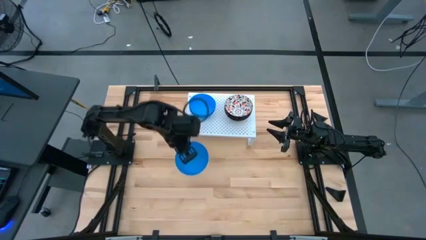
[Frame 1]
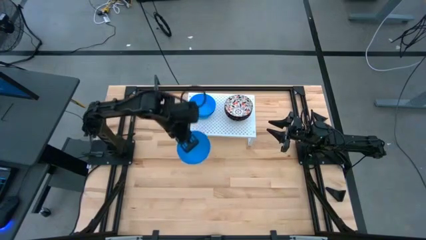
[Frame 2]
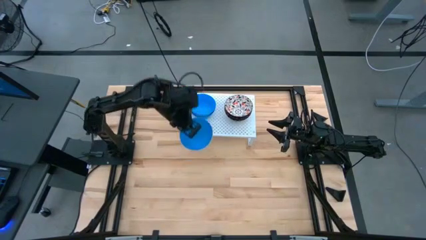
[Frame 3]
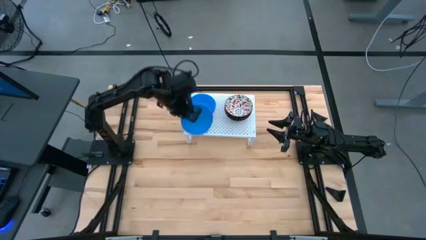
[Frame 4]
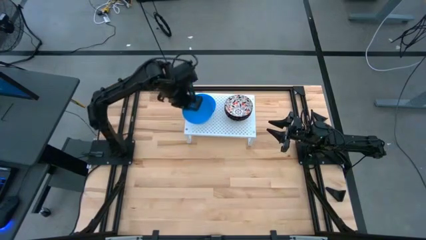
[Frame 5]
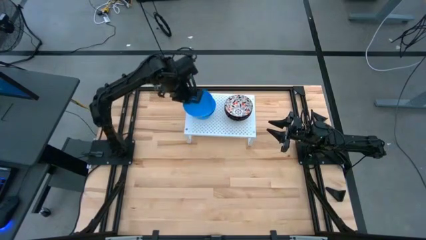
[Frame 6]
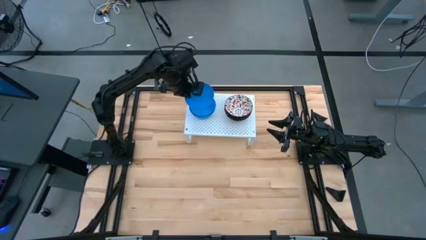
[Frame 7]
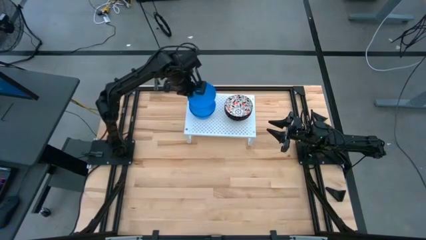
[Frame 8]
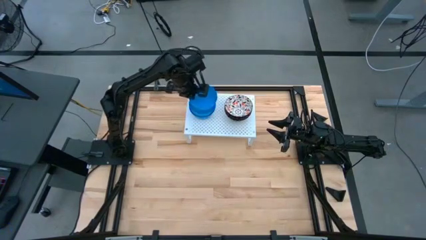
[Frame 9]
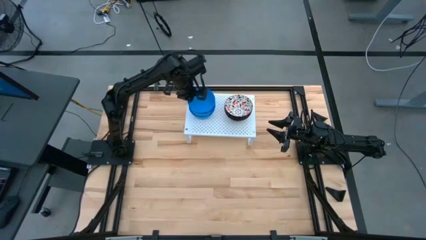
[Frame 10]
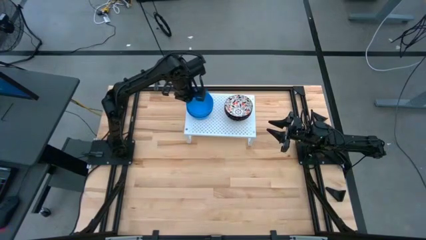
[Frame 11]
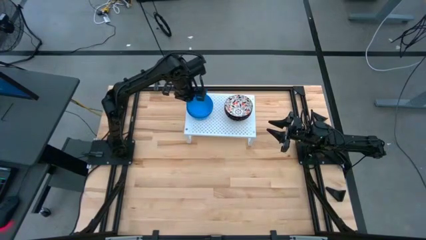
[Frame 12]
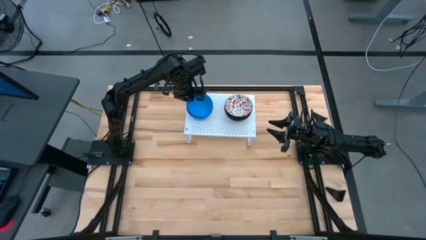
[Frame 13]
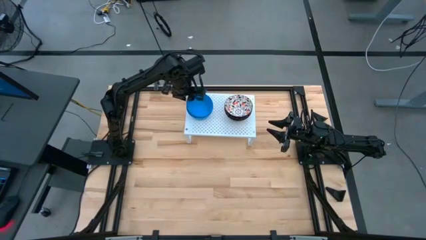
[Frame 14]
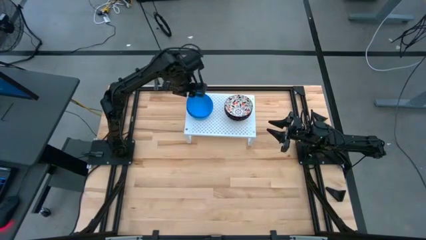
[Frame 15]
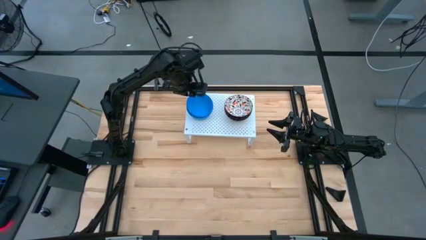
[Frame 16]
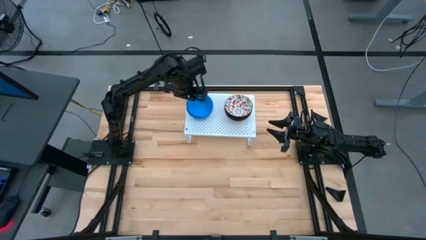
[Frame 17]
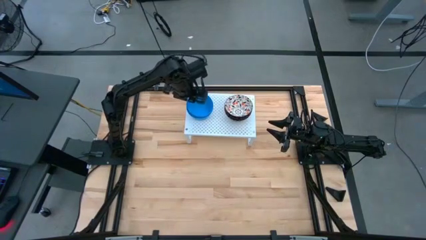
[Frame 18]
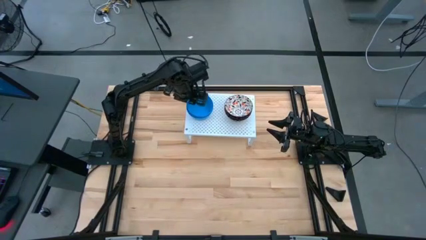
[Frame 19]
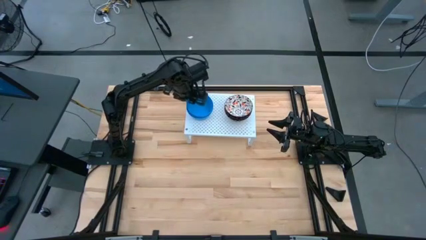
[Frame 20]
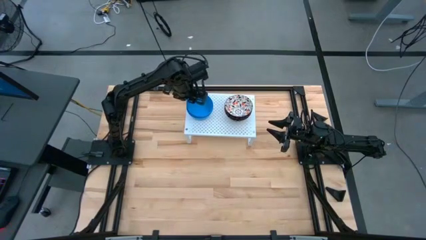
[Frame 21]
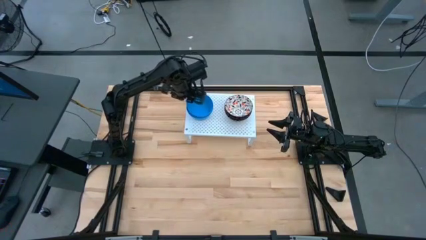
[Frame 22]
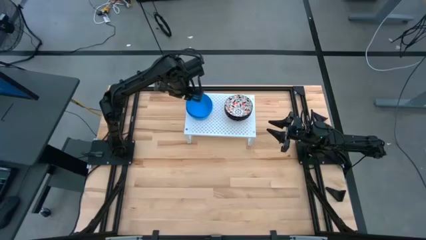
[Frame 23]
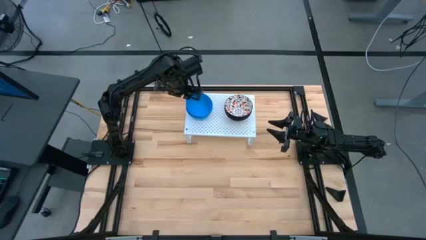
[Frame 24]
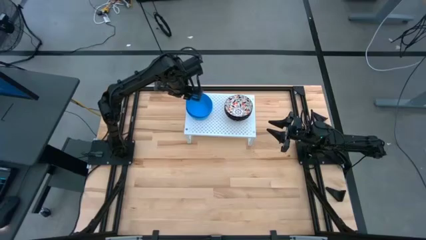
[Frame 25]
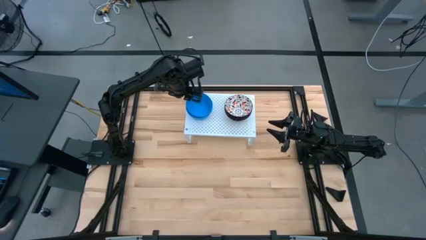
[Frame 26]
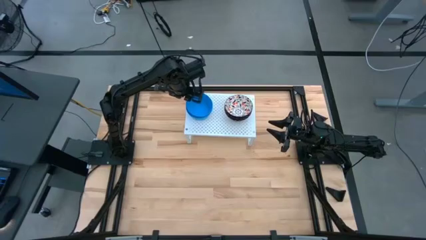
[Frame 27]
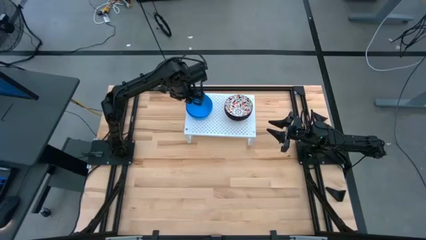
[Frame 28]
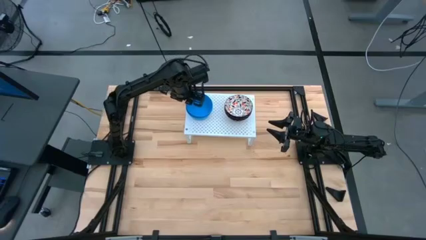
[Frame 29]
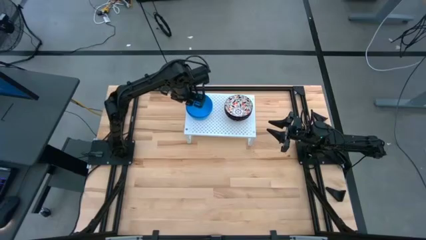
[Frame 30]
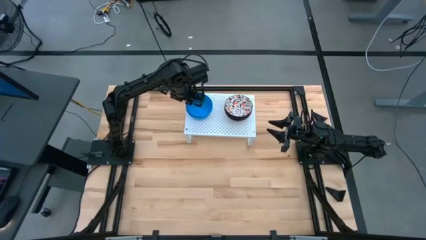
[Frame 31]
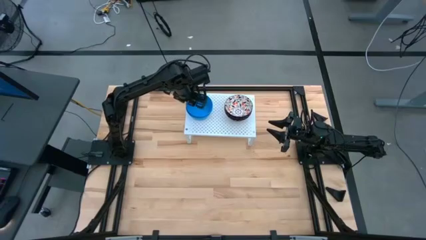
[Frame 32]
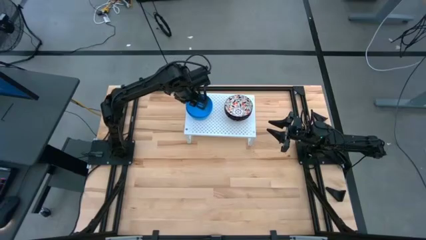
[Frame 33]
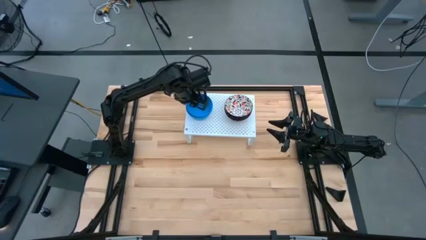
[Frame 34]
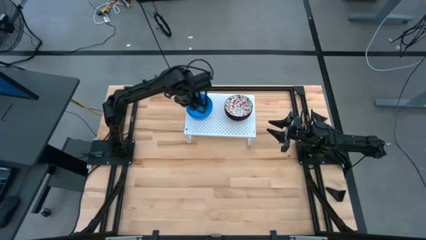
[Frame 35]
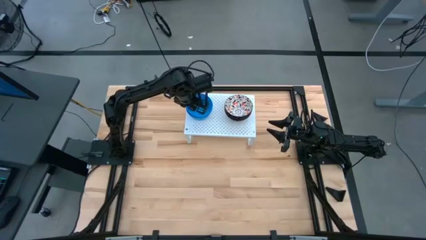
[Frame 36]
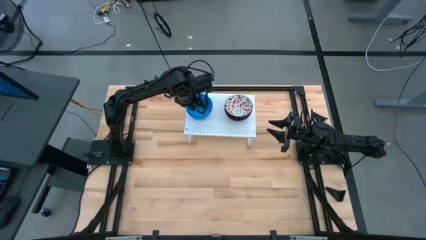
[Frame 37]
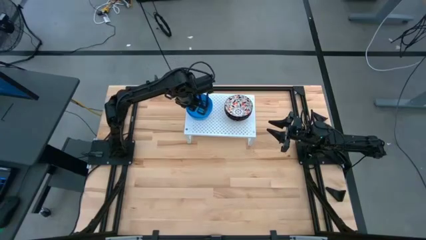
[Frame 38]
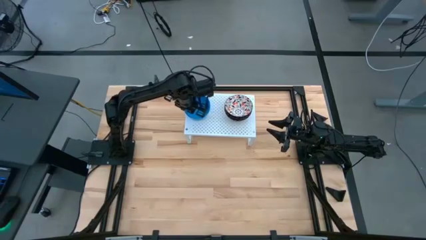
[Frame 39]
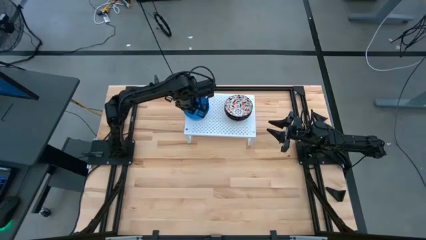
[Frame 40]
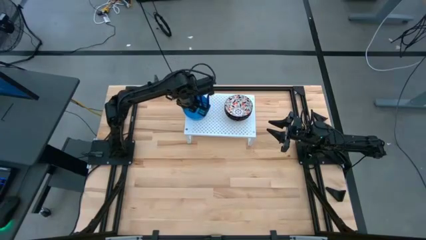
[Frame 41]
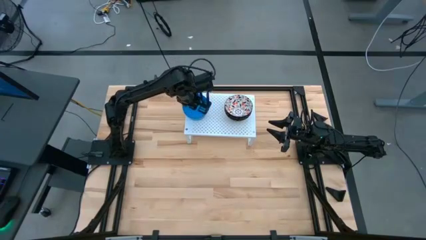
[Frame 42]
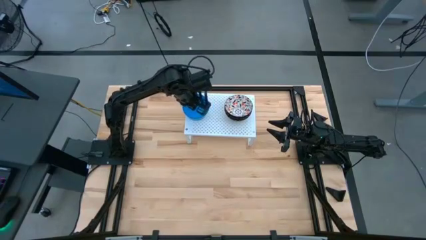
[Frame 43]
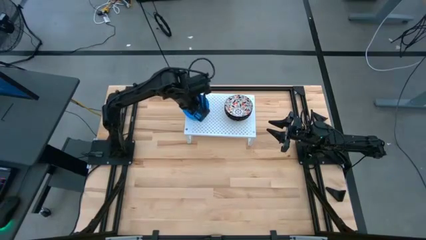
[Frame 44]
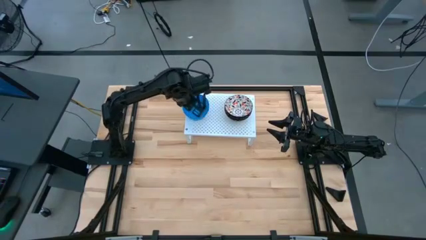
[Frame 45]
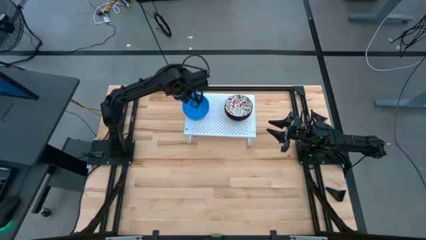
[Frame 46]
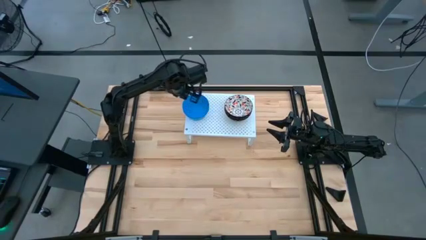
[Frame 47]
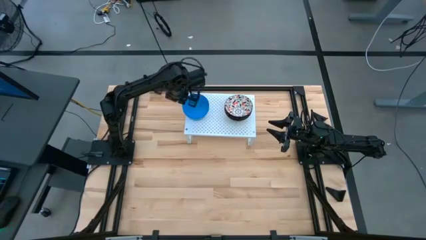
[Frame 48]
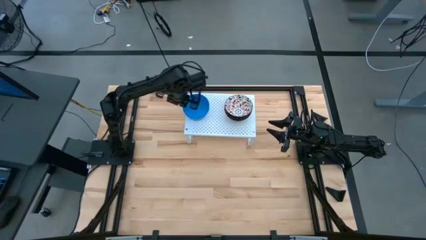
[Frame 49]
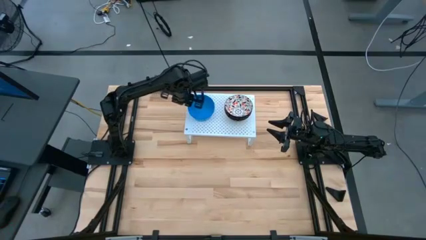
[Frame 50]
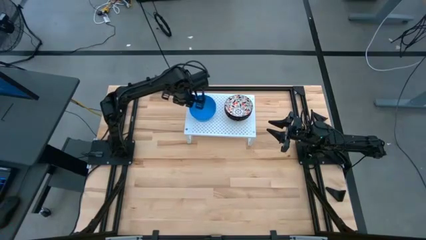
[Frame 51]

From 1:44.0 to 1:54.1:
Task: Pick & Place Mini bowls
Stack the blue bowl on top of the other blue bowl on the shelf

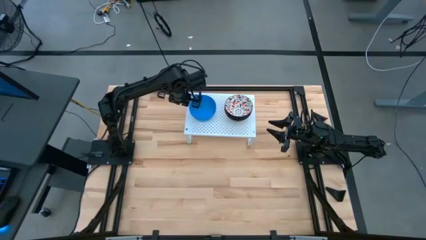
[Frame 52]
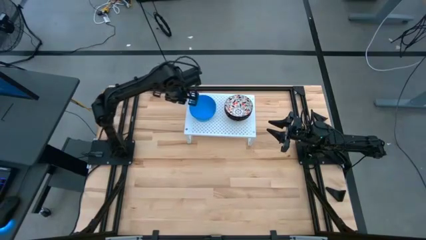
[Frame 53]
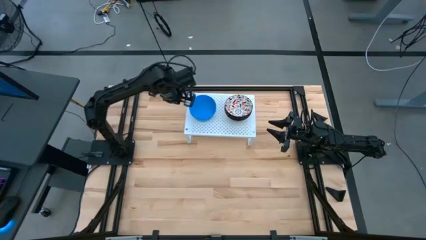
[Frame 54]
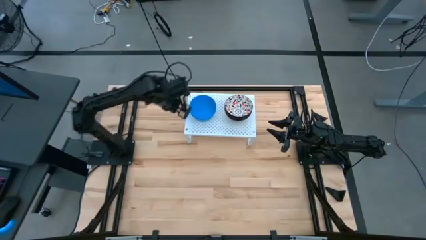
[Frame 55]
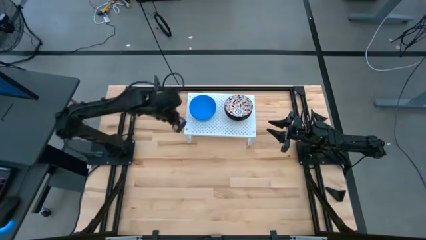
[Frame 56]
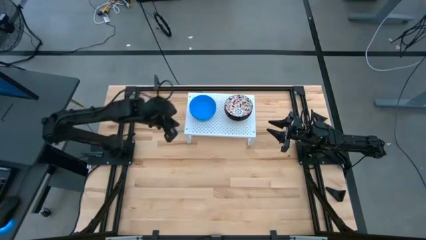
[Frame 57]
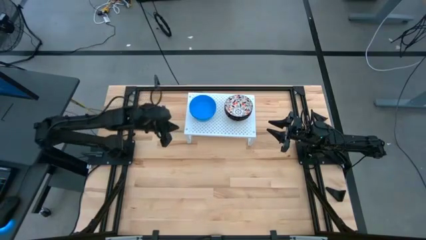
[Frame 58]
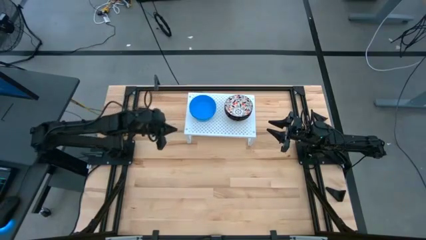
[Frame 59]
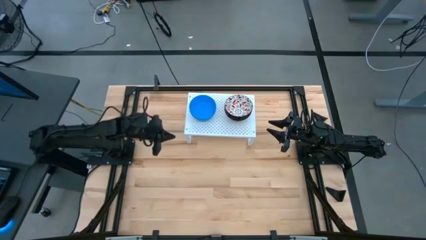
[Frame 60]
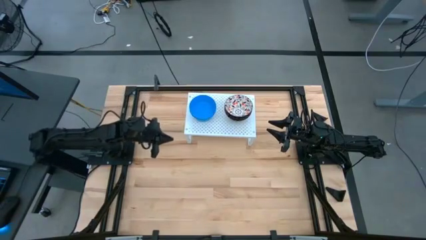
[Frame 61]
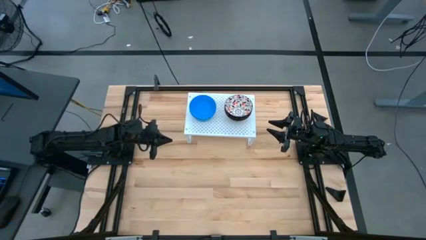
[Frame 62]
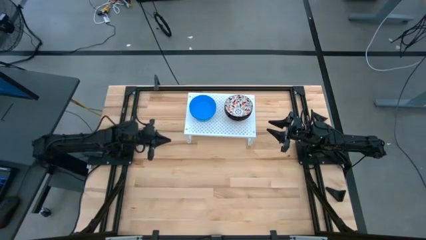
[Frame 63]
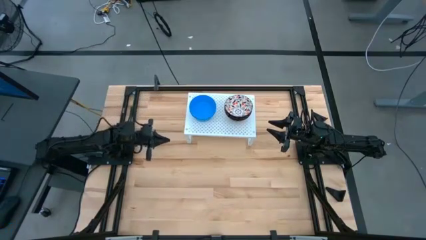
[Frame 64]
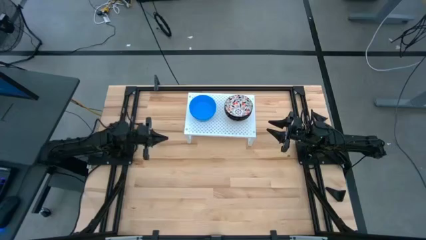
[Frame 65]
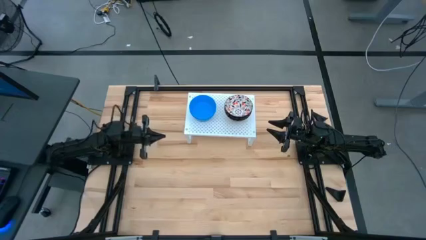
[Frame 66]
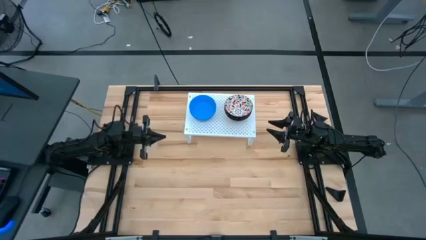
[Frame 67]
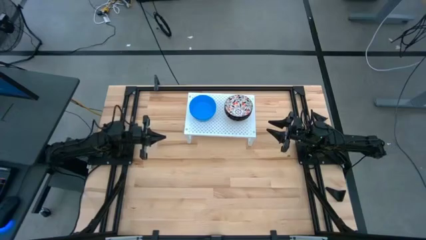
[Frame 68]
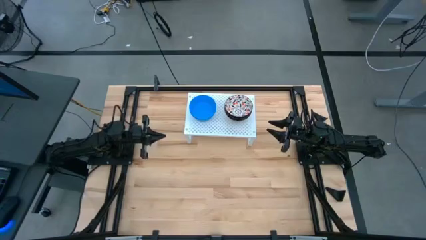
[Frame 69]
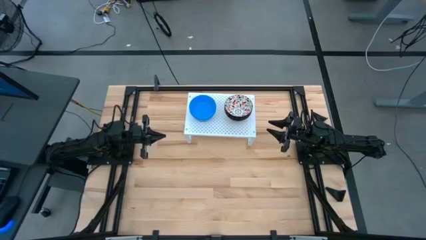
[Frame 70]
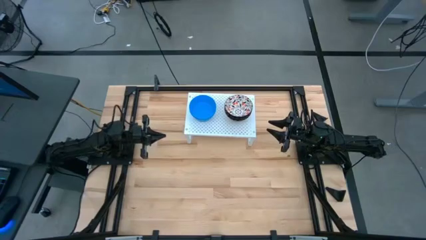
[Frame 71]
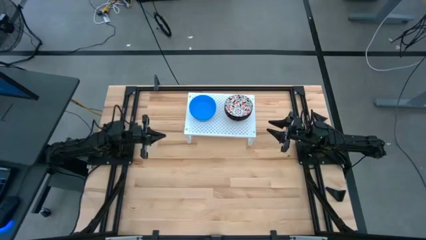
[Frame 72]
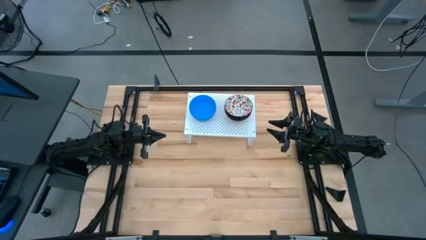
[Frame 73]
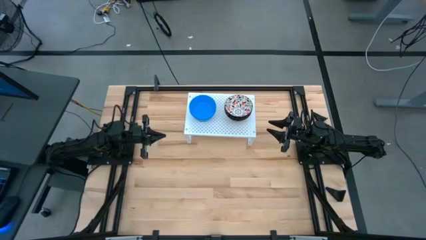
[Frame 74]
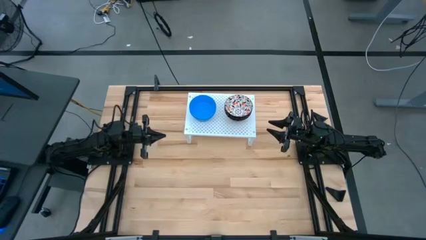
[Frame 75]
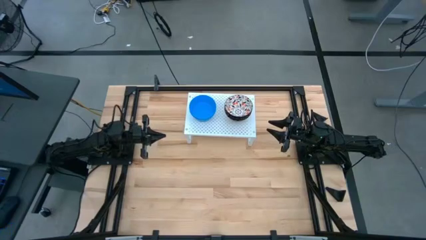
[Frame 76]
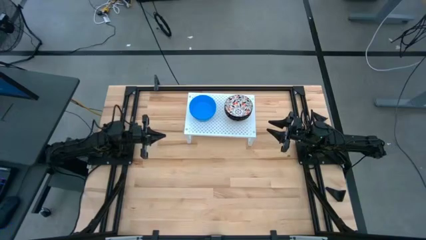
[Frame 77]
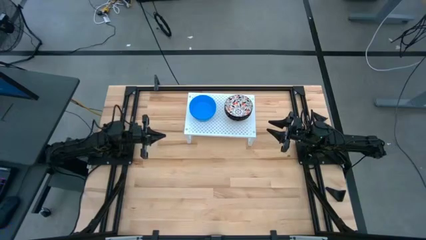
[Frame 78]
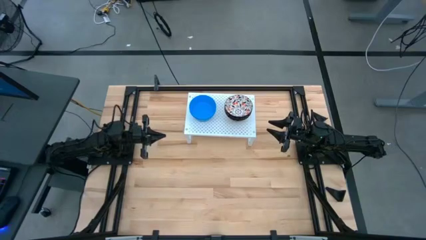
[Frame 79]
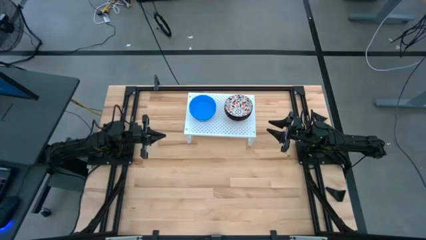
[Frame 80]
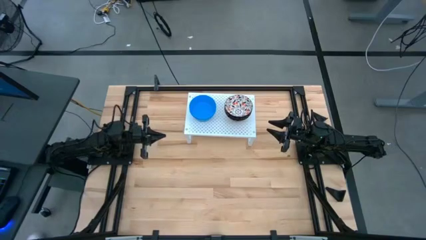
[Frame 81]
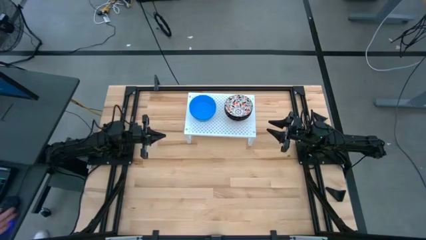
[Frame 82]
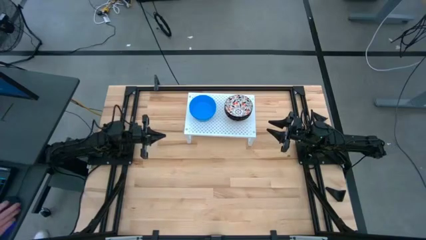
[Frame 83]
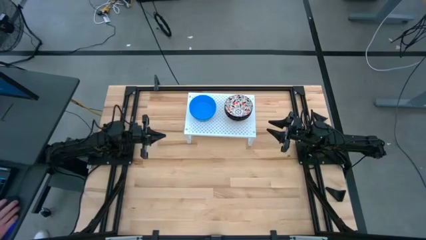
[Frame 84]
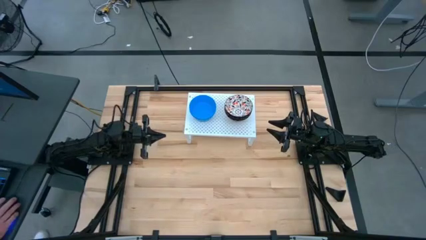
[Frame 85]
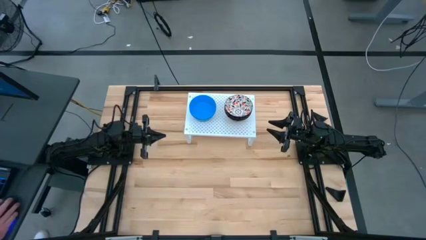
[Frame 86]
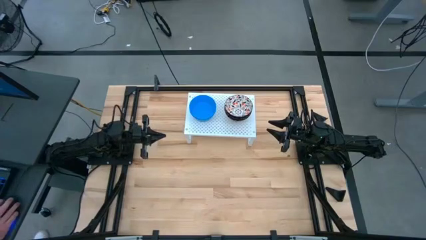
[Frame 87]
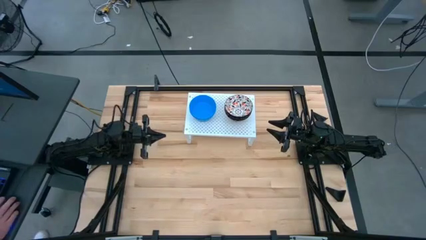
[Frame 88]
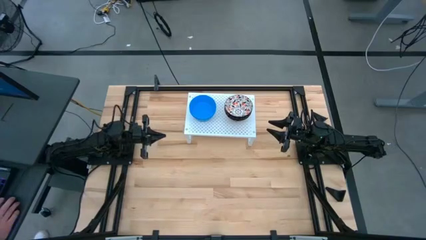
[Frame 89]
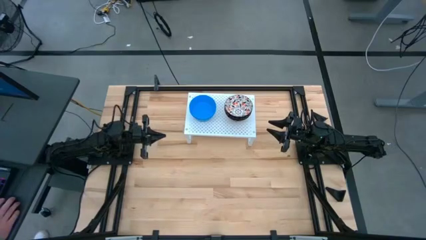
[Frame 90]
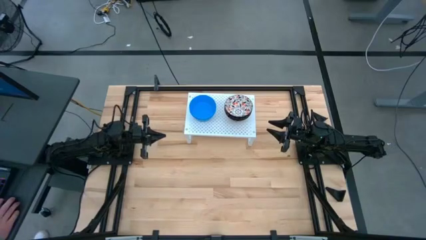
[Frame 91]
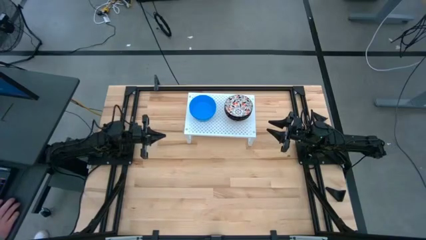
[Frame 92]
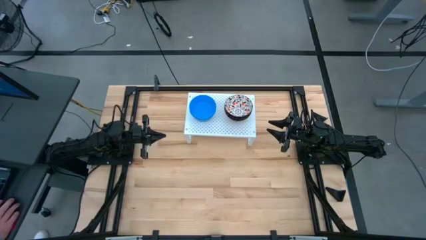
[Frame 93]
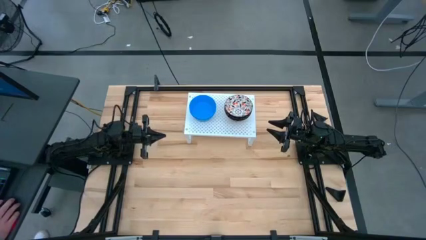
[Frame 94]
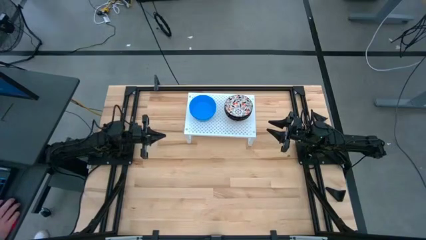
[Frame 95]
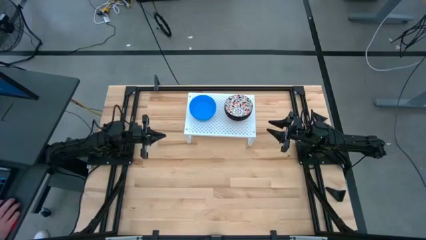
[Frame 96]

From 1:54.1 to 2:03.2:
Return to Home Position
